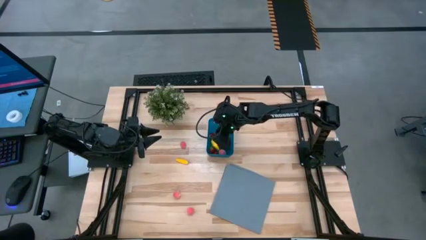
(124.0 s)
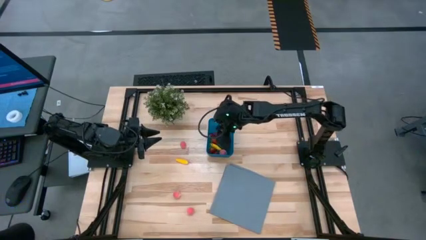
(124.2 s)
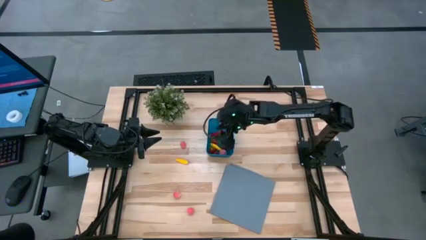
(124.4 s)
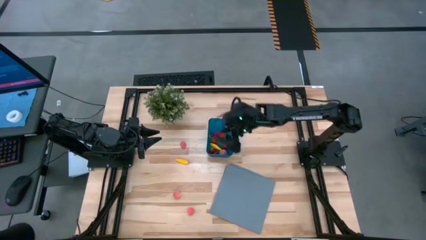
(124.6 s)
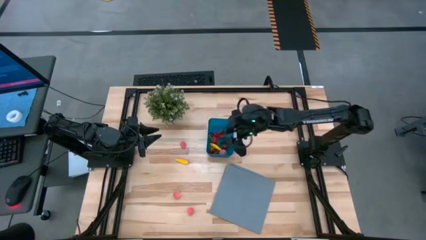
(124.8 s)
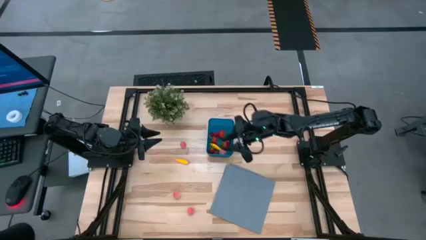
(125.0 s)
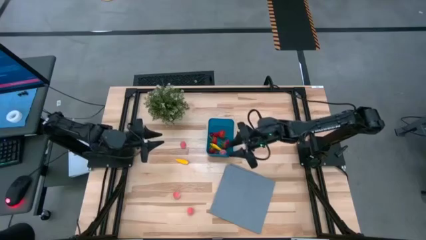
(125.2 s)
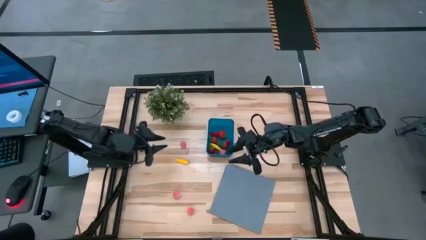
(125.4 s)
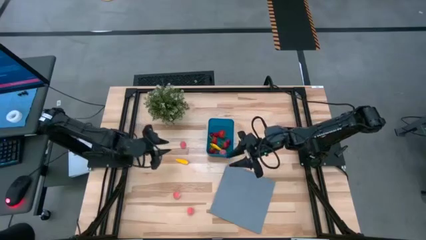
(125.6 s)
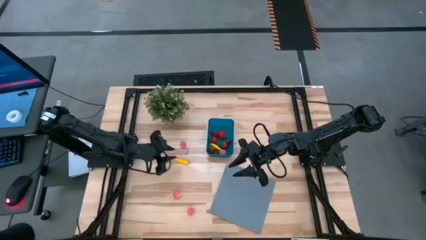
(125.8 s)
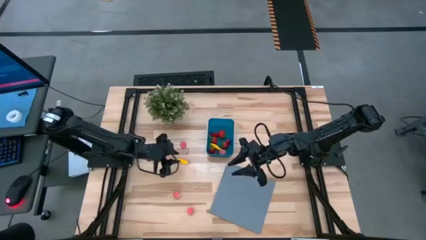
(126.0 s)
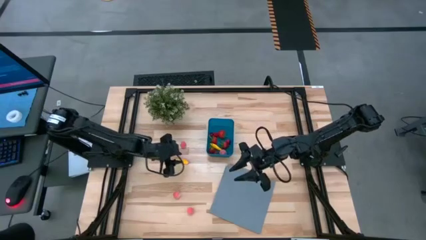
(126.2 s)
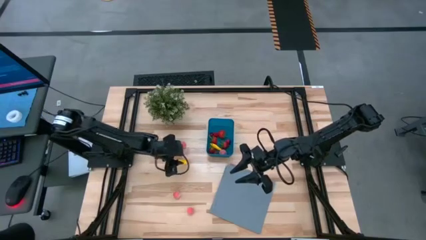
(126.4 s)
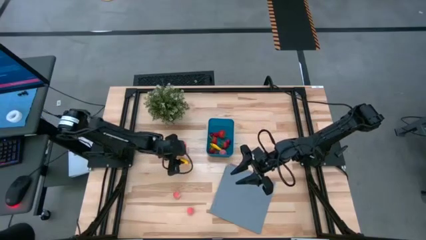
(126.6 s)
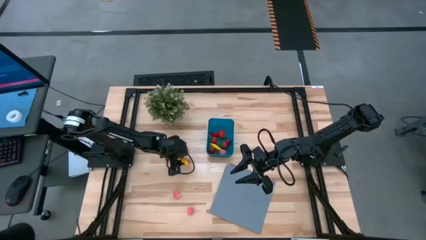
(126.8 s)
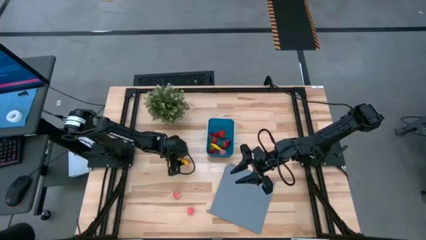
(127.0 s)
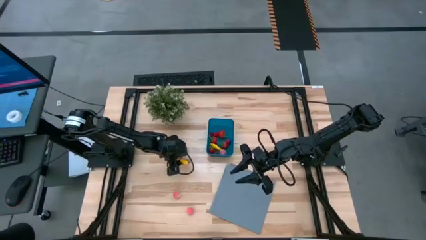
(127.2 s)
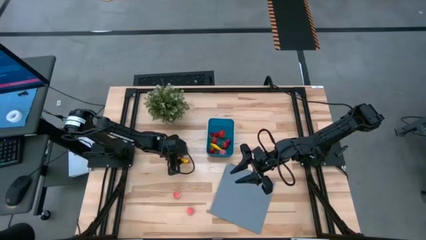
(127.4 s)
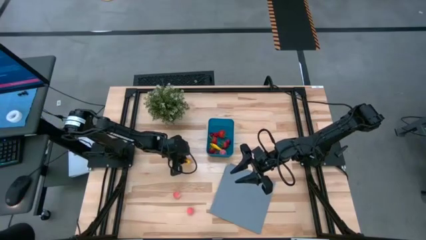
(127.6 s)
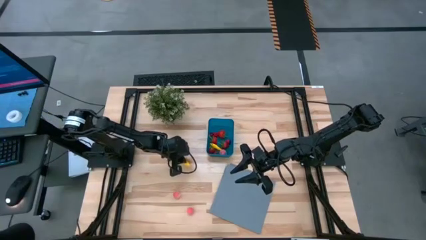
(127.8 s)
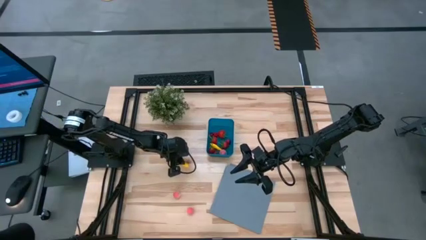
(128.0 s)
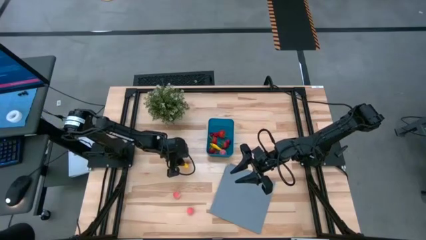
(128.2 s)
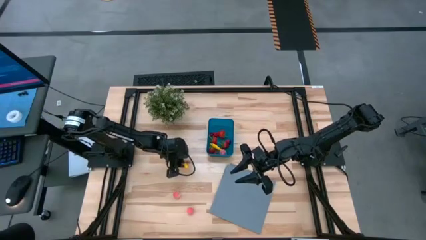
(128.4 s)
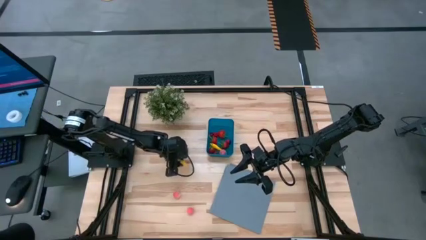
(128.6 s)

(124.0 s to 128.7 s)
Task: Pick and placing Produce into tupperware
Put the corn into the blue bin

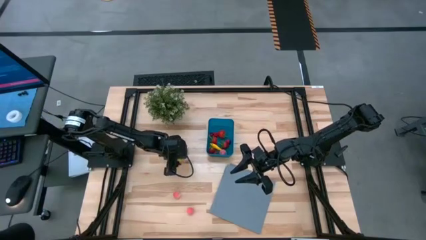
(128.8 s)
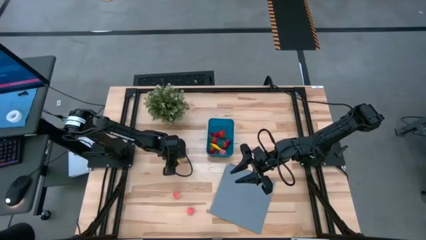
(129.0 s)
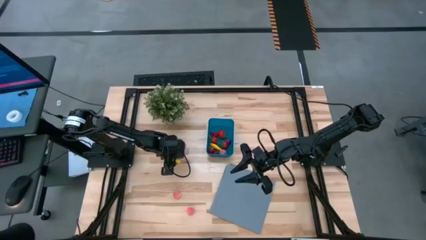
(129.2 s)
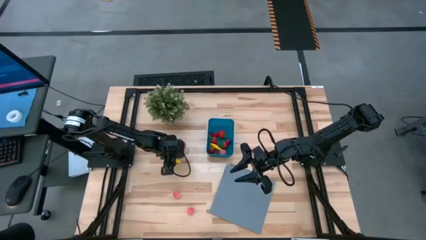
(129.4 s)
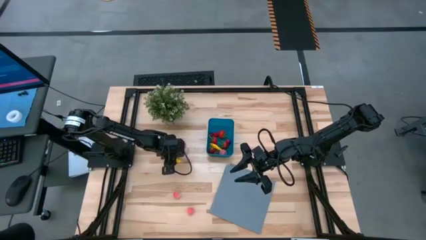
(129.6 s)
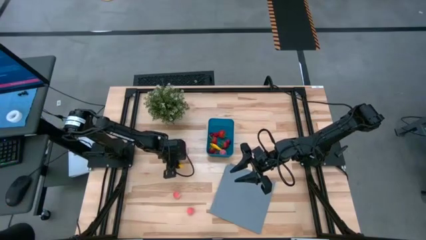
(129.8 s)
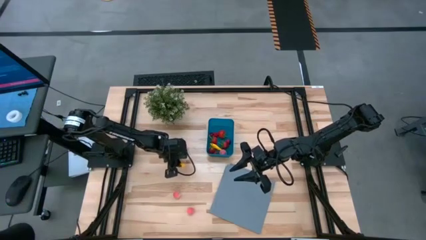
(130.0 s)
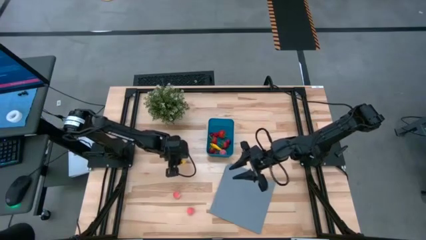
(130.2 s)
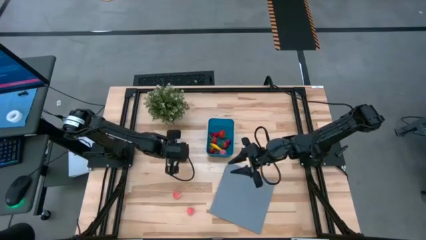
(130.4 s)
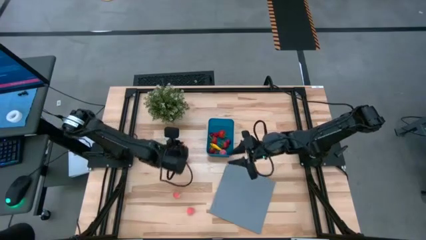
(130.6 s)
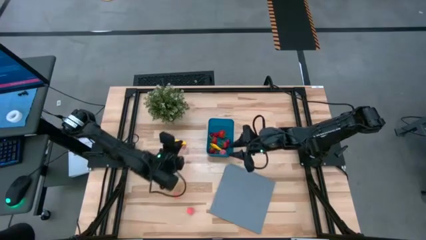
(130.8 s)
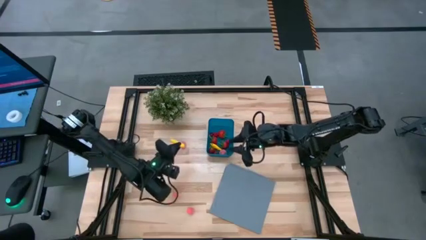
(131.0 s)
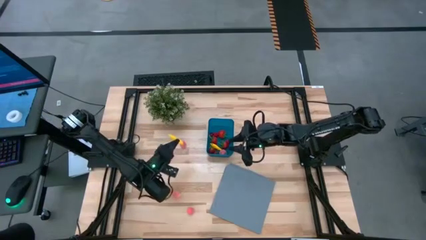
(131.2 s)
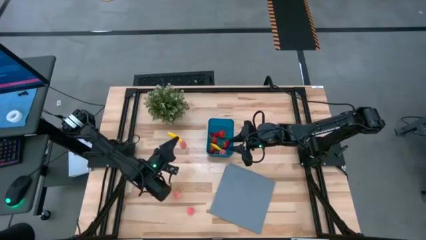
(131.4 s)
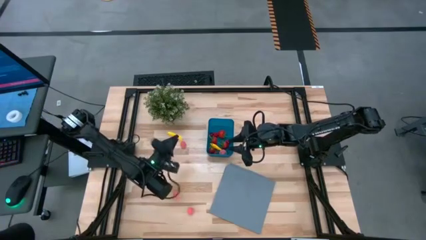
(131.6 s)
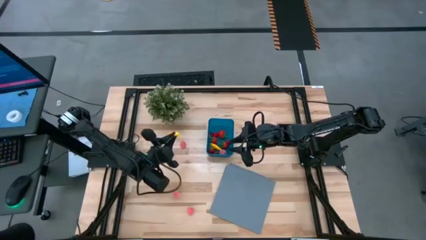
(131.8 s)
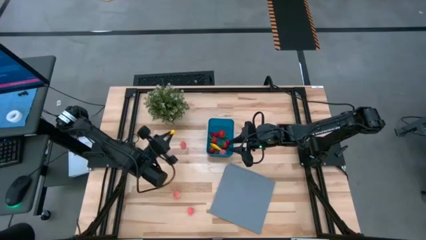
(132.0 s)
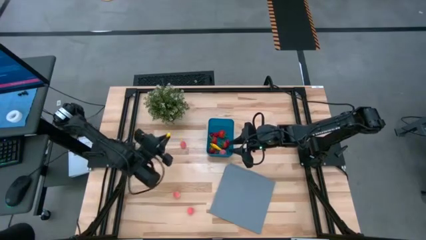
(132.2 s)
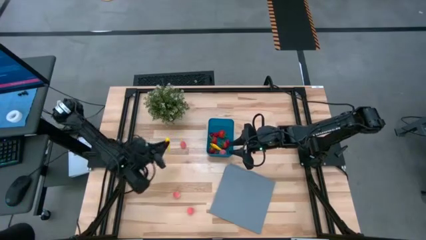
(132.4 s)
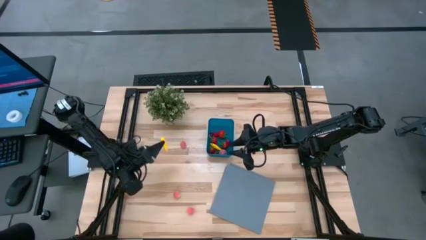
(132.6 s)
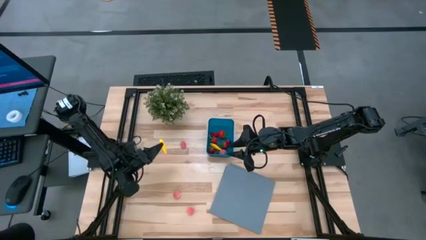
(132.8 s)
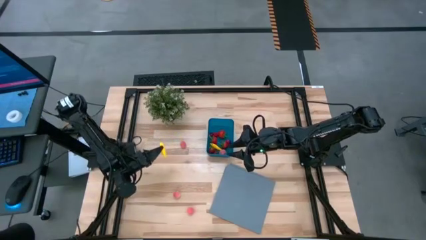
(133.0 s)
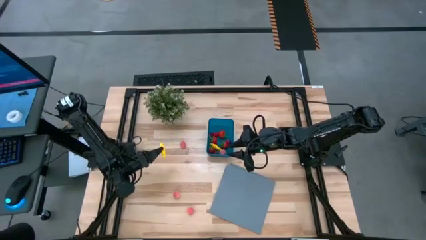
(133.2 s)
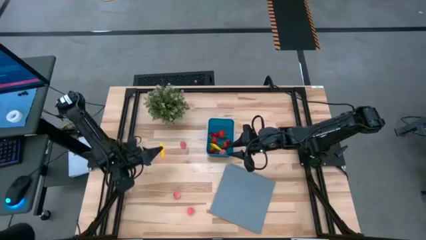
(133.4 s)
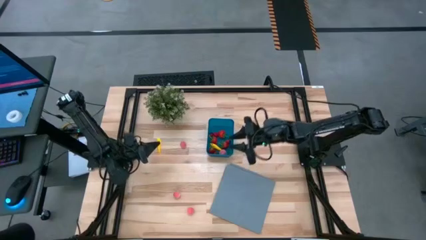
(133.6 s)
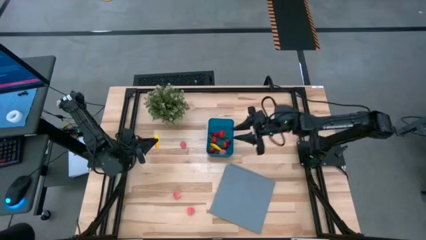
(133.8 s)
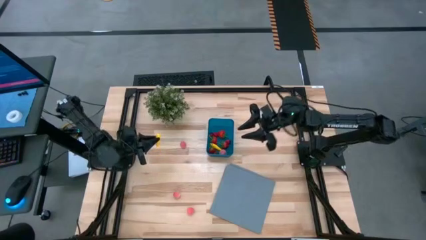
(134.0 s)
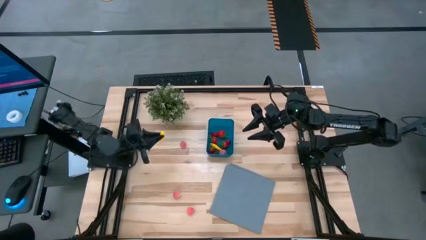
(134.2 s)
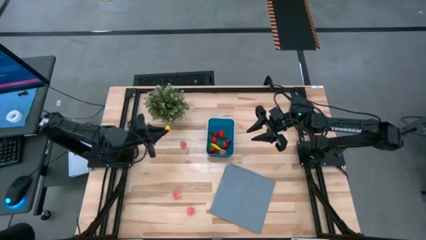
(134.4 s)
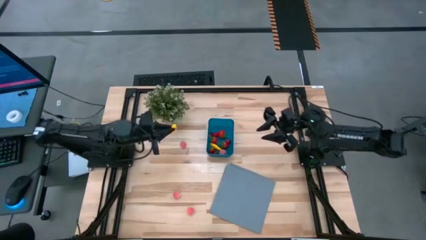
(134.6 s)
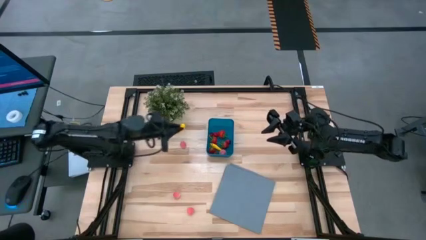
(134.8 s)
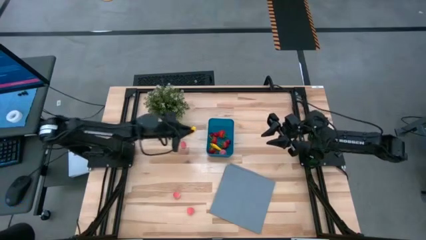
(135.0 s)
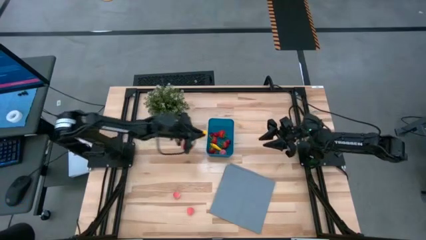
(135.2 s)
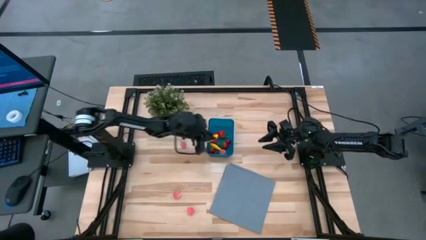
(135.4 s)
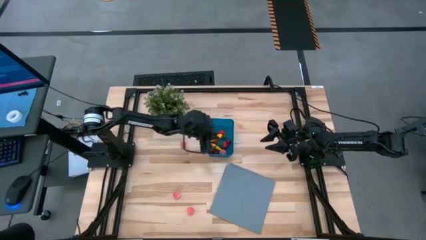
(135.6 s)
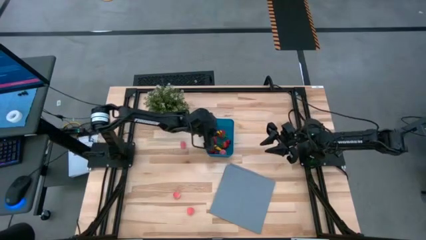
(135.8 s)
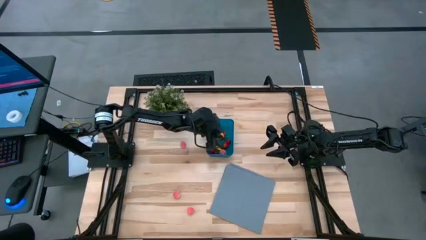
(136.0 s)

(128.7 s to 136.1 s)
Put the corn into the blue bin

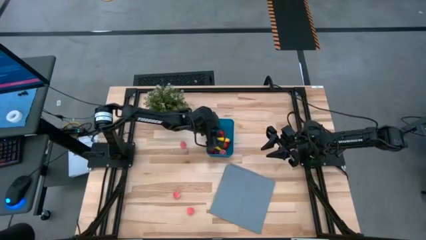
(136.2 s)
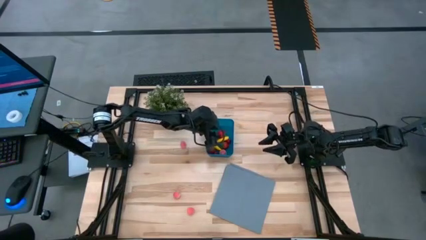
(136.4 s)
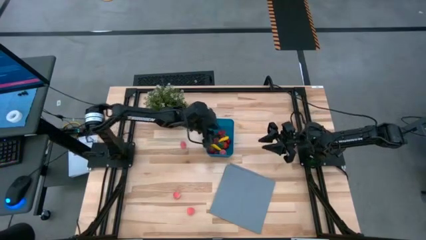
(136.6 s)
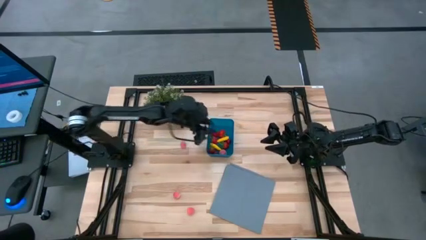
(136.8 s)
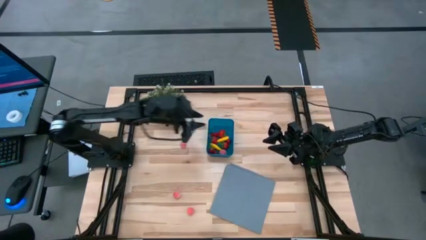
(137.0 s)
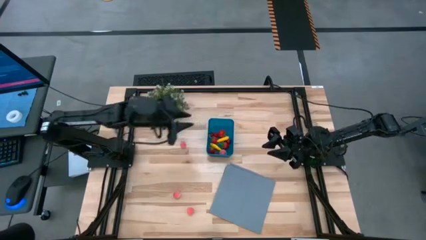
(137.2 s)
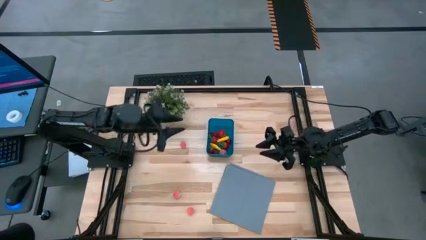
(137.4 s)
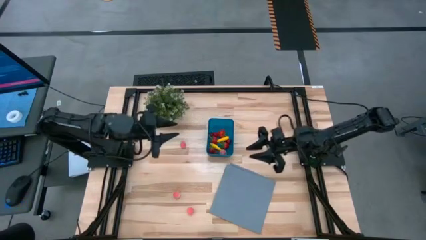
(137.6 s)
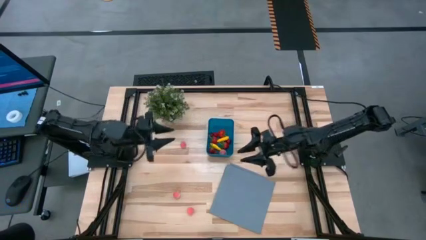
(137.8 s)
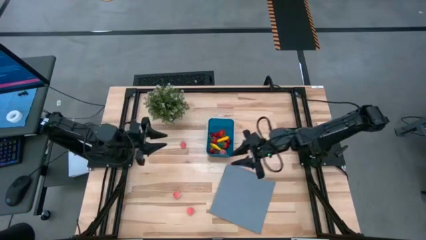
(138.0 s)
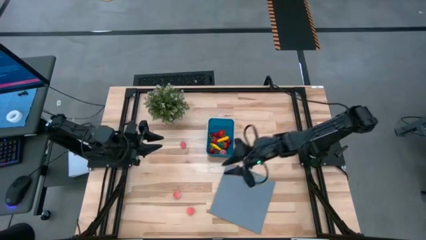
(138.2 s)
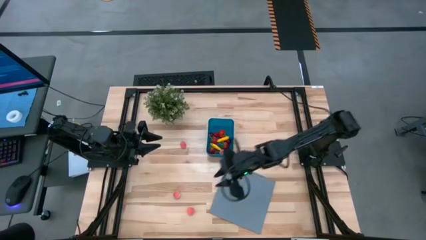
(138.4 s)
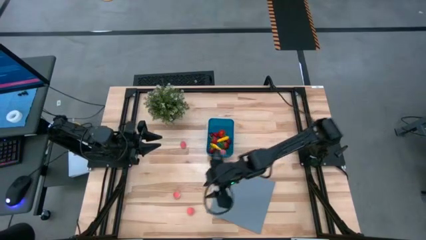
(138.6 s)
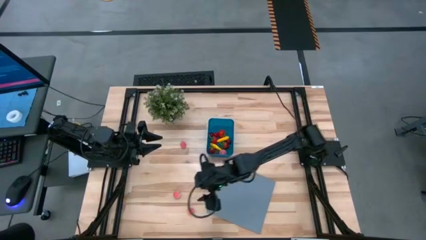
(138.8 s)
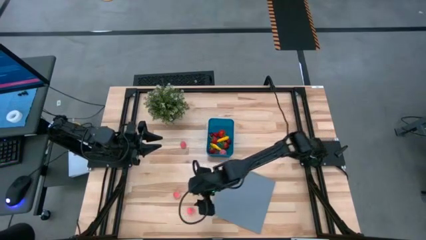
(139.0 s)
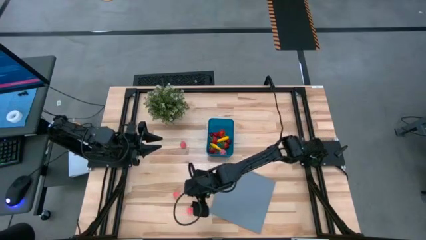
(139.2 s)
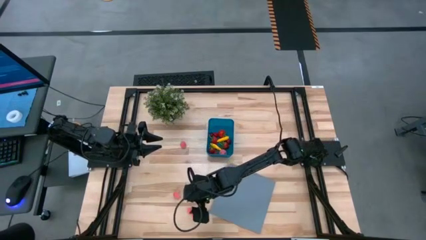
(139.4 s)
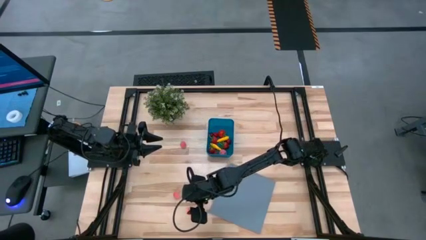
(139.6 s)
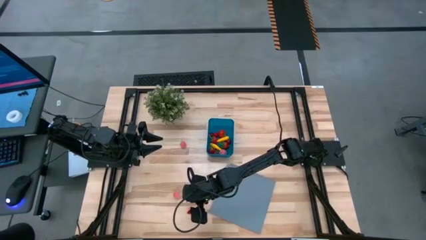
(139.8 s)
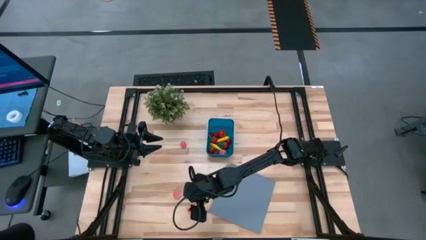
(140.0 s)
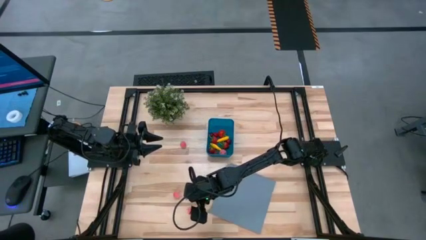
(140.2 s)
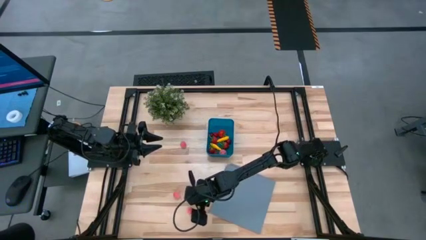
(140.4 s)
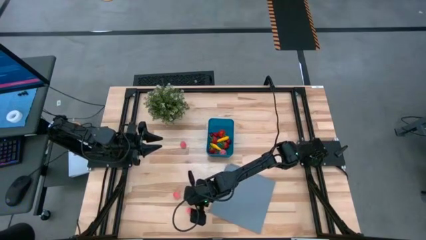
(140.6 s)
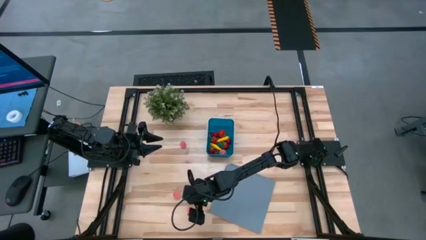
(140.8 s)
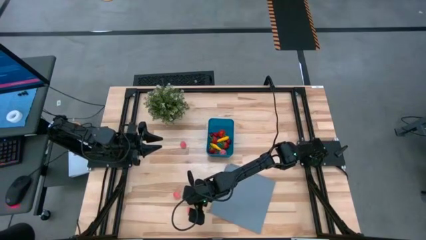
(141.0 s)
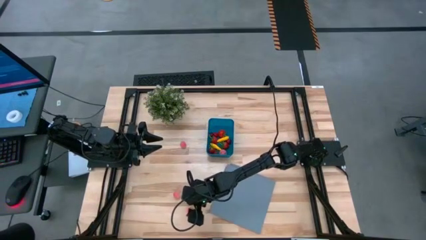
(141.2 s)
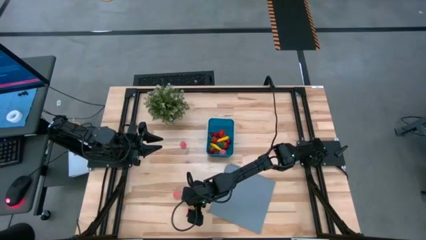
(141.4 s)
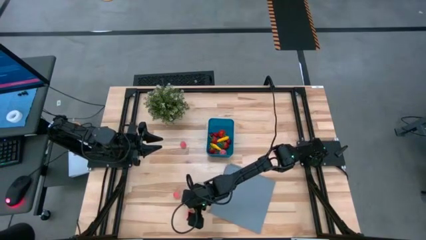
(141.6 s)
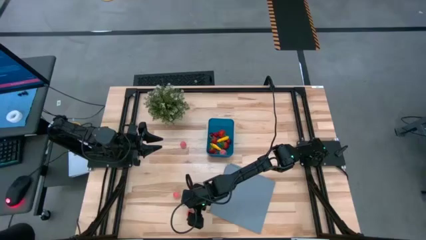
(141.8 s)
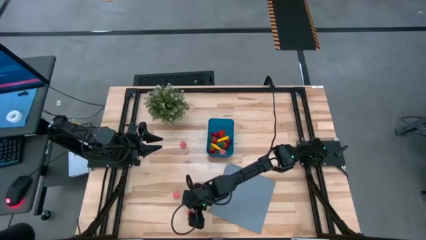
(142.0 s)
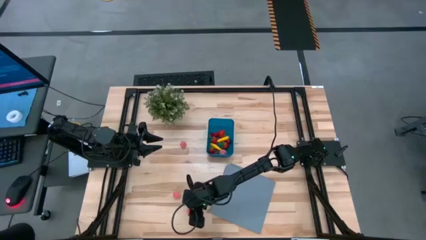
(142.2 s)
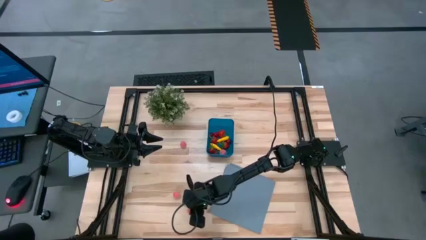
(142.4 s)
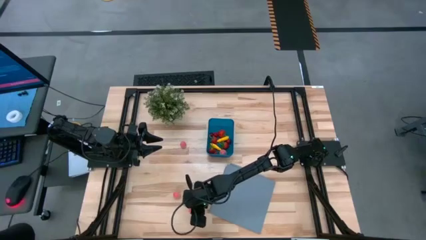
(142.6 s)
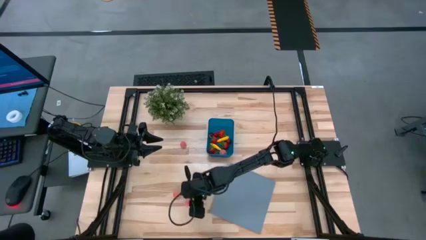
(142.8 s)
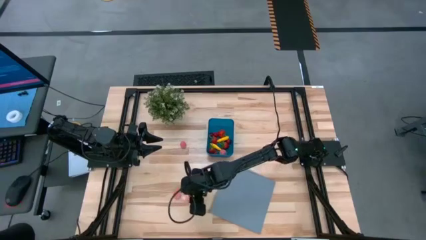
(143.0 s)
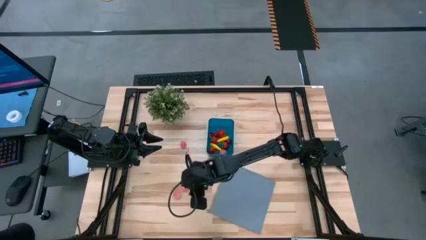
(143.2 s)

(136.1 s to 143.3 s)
Put the peach into the blue bin
